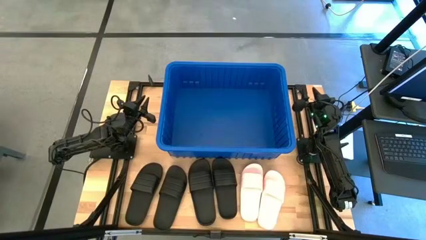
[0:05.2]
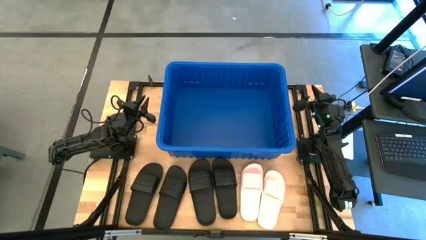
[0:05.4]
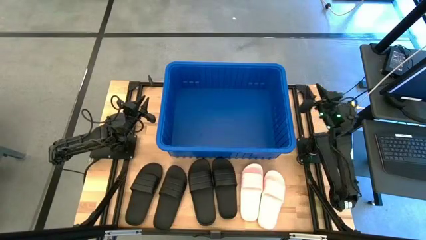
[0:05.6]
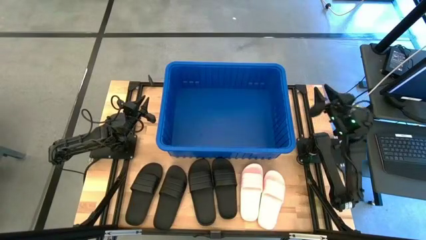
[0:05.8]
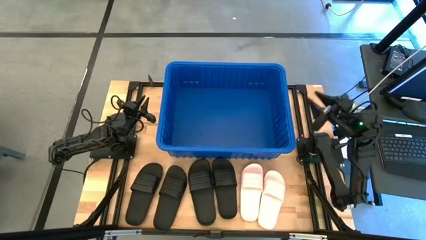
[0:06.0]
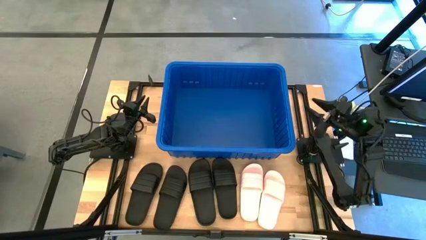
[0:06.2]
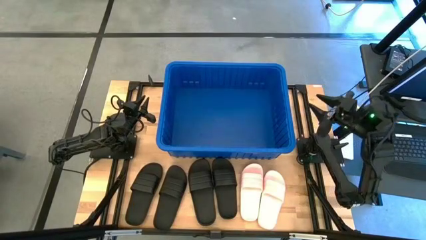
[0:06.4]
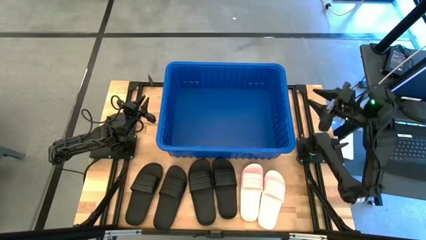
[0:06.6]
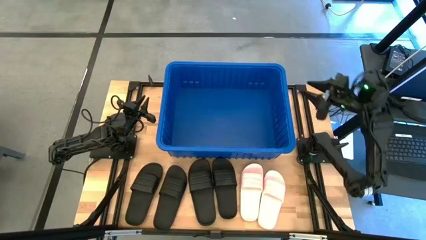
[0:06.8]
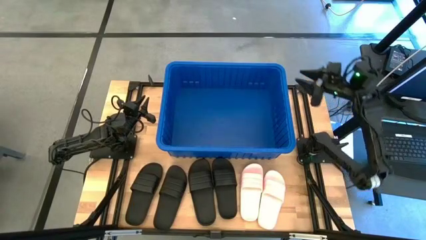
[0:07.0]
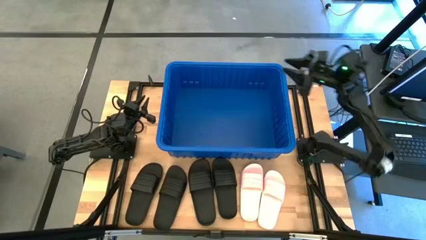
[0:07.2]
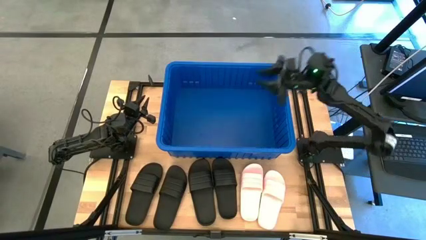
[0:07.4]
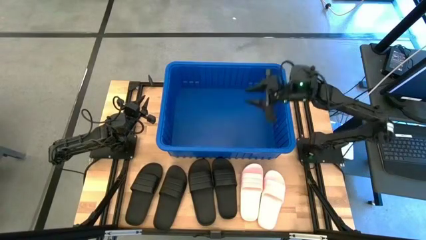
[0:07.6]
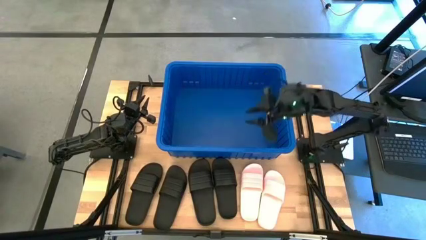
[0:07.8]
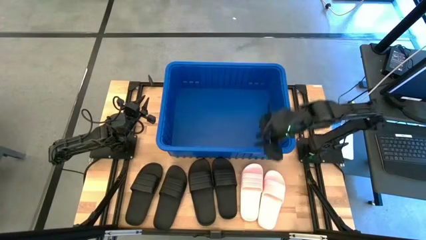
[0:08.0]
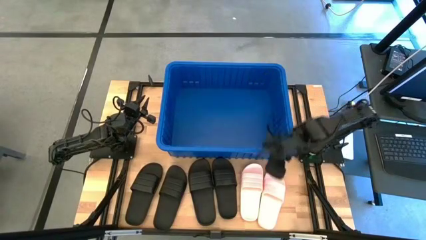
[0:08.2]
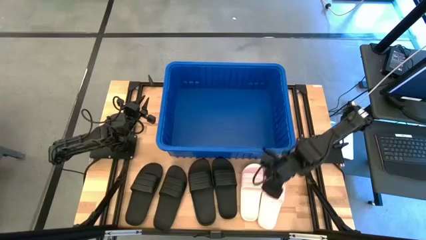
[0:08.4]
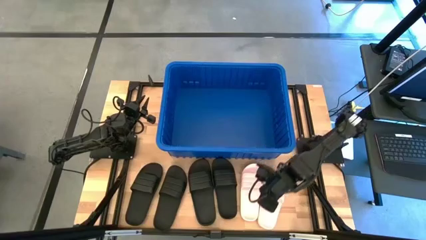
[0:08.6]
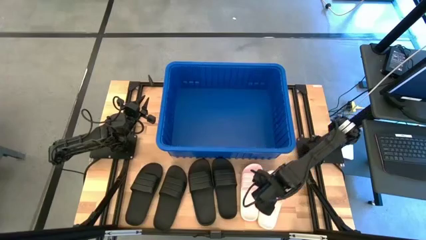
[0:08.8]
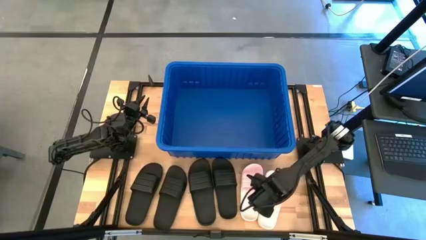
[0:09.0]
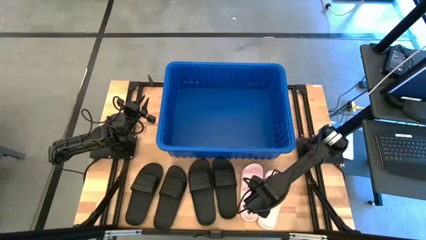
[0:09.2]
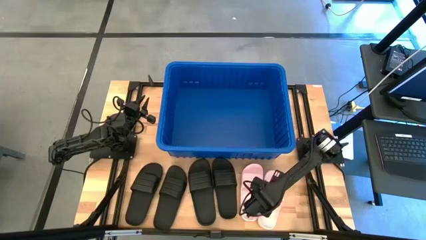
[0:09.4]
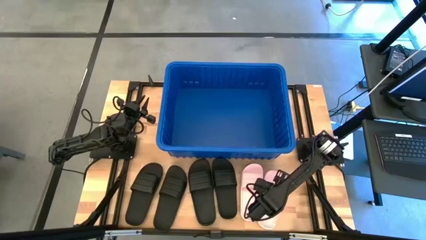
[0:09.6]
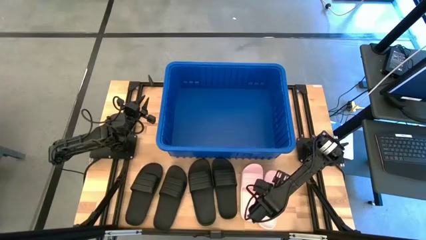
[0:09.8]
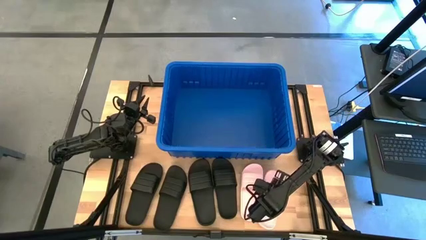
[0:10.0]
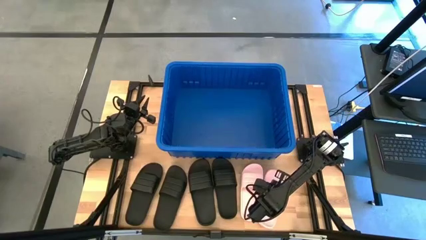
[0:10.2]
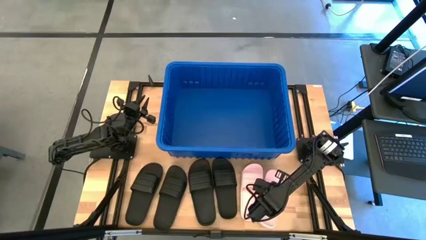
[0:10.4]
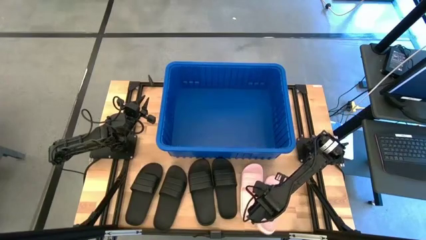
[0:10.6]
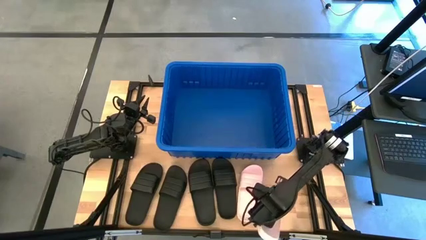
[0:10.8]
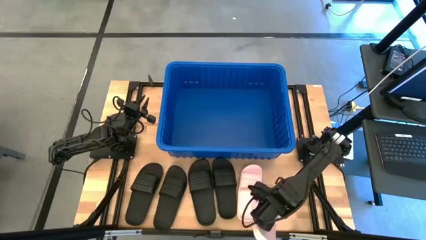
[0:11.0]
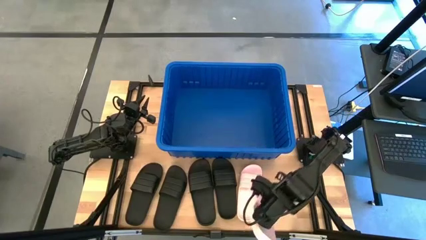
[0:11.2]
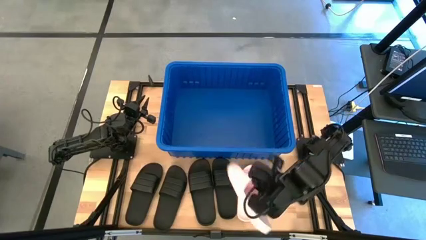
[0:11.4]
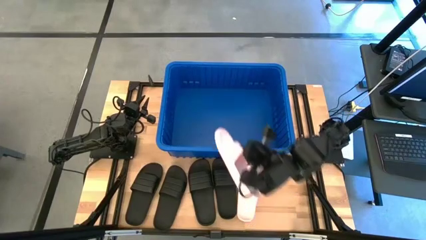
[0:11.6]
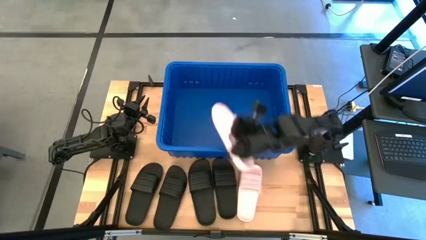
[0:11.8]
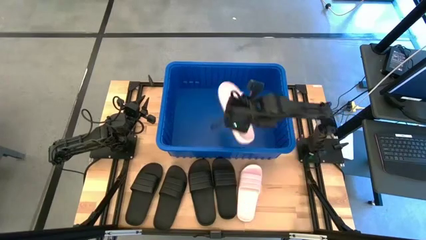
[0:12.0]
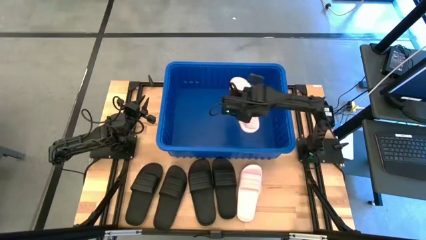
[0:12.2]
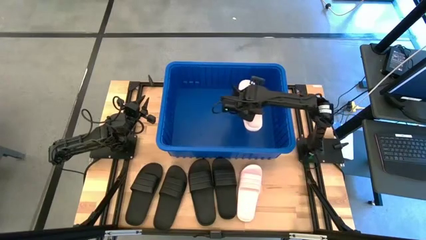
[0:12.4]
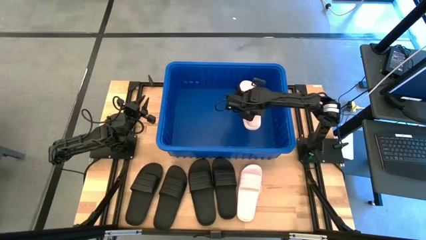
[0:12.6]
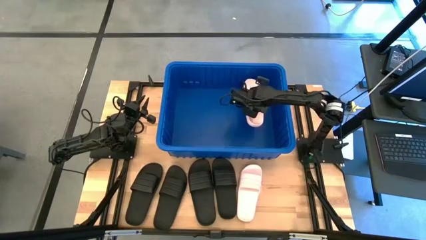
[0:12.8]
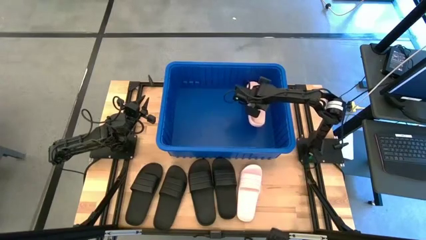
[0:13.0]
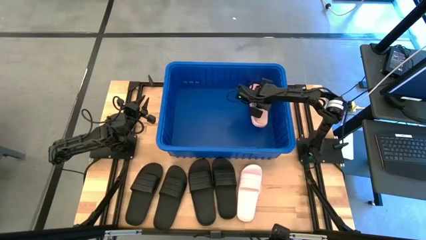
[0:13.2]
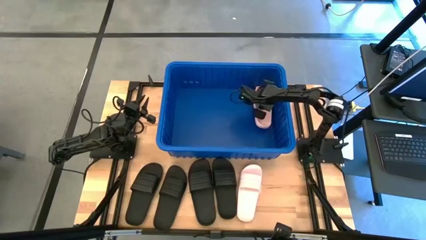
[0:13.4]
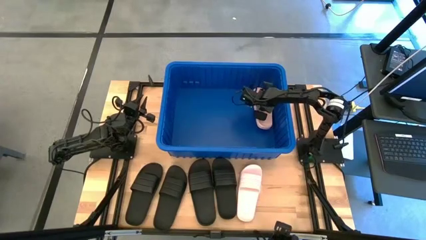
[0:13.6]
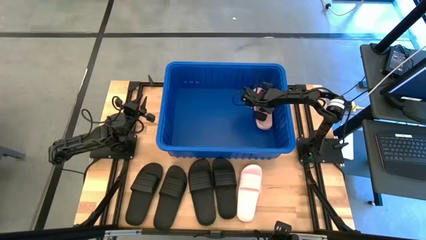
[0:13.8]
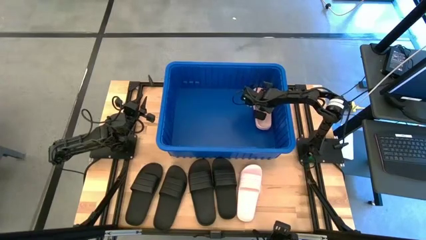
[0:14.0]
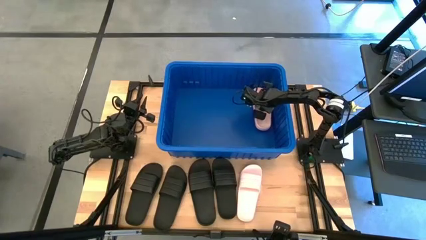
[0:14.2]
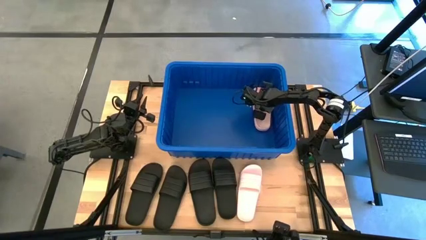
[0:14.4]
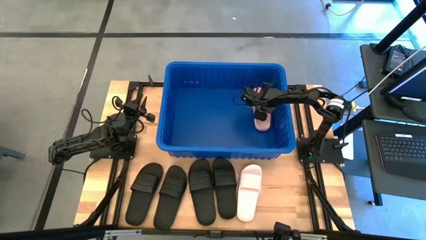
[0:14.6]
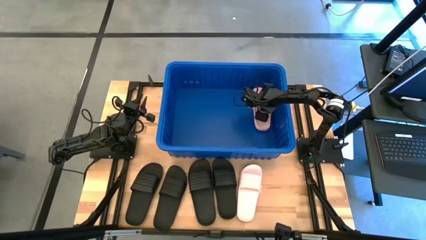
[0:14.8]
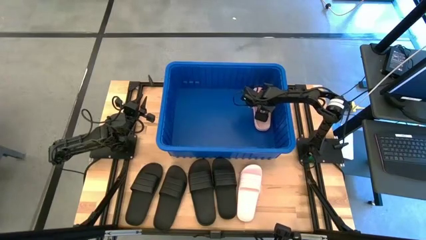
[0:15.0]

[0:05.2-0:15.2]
Task: Pick and place slides into bin
Put the pink slipper into the blue bin
